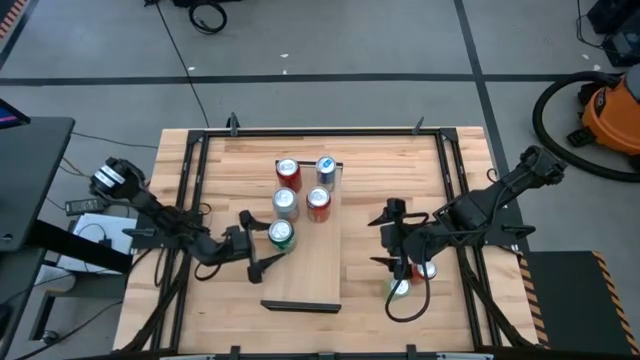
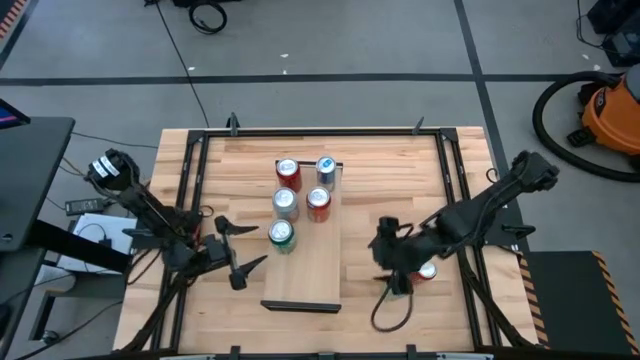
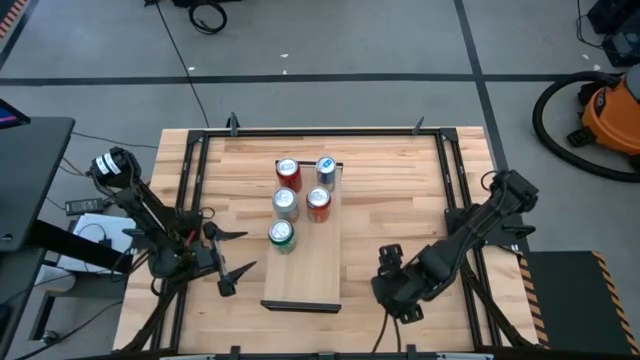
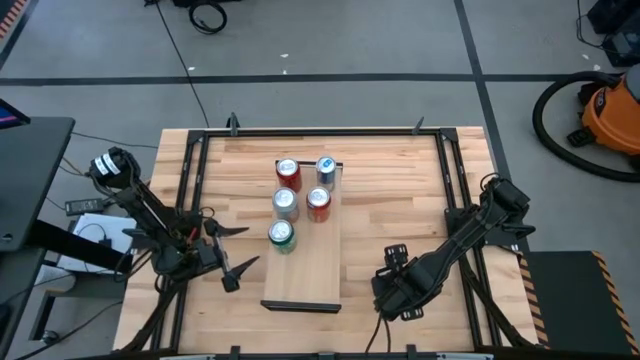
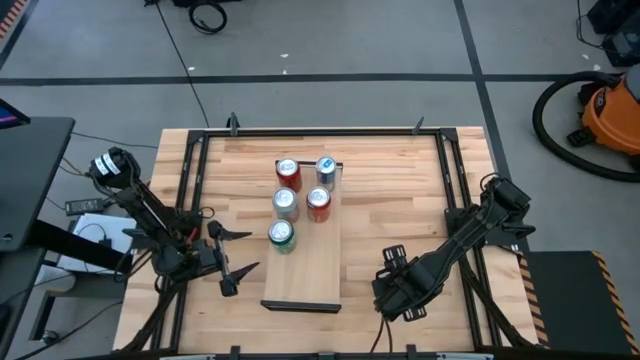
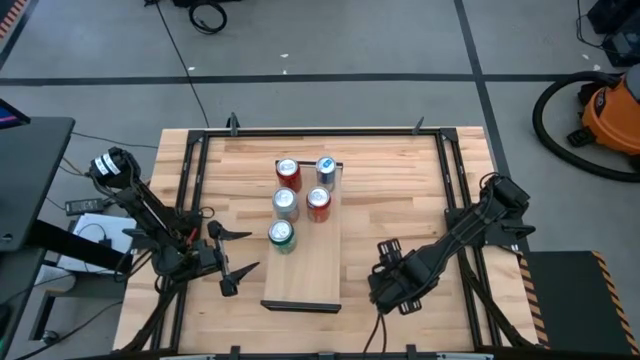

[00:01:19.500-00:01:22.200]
Task: Place canned beverage on shelf
Put the light green soda can on the shelf

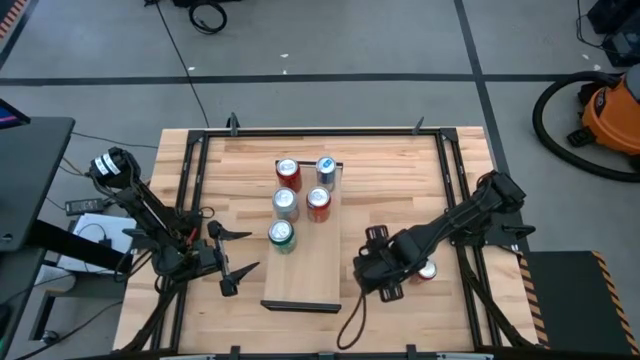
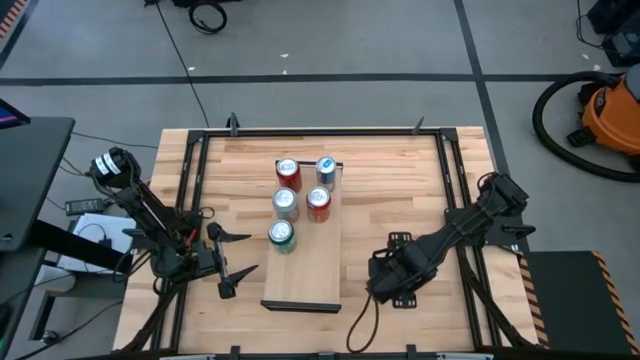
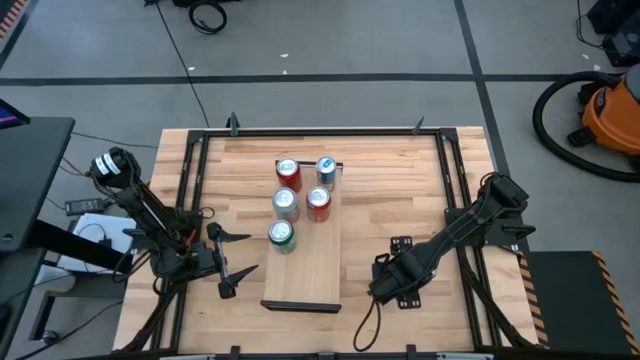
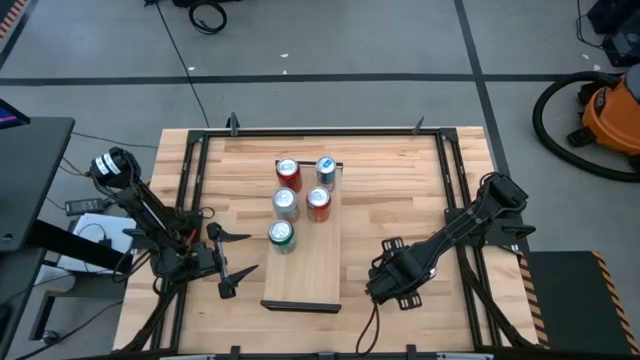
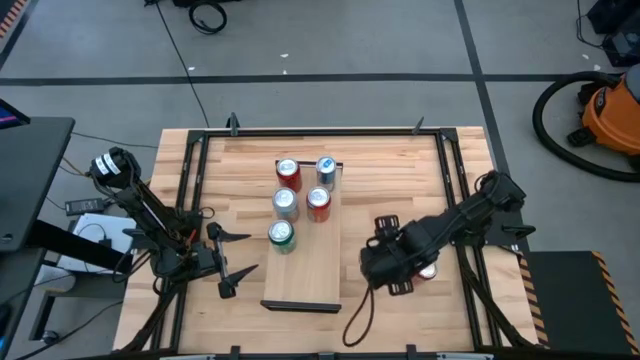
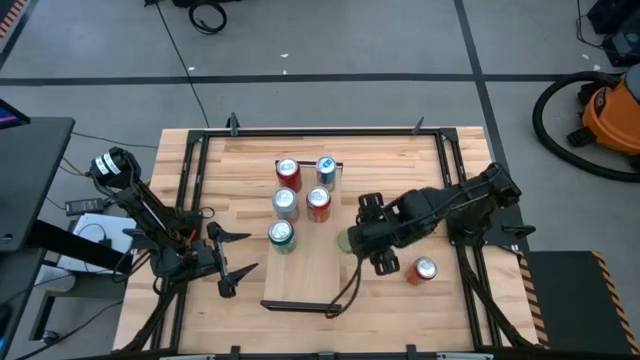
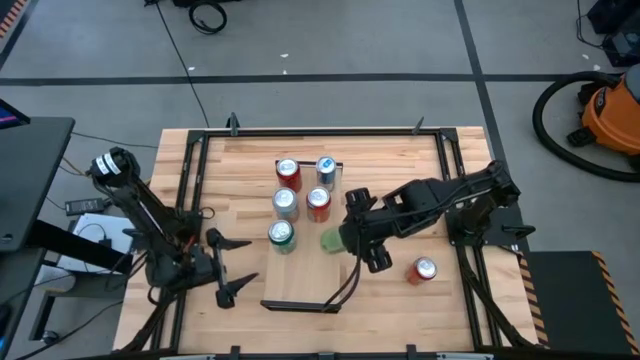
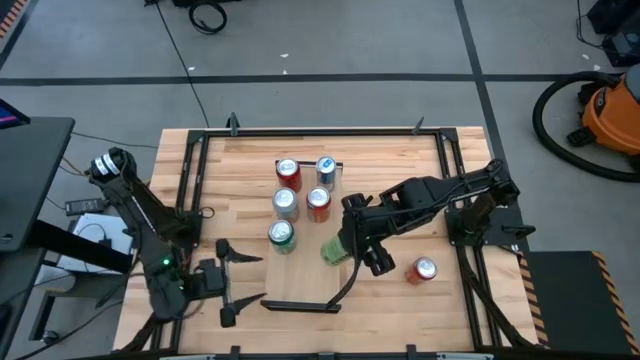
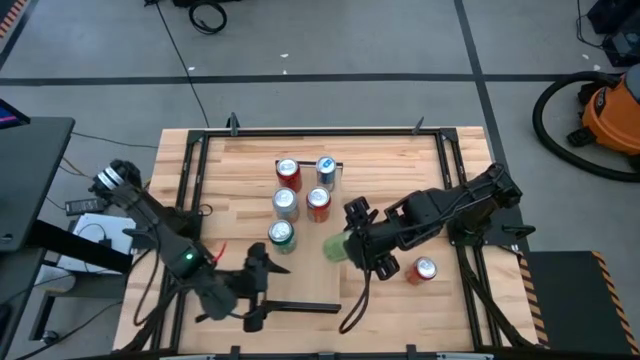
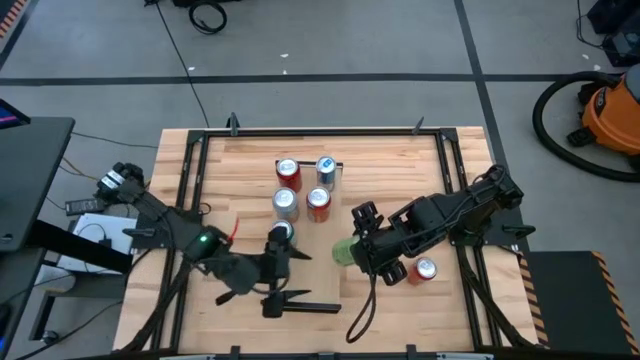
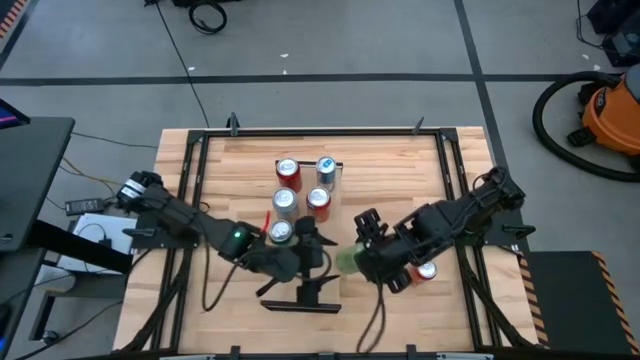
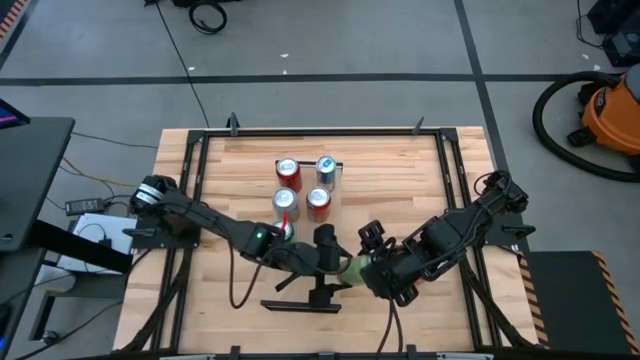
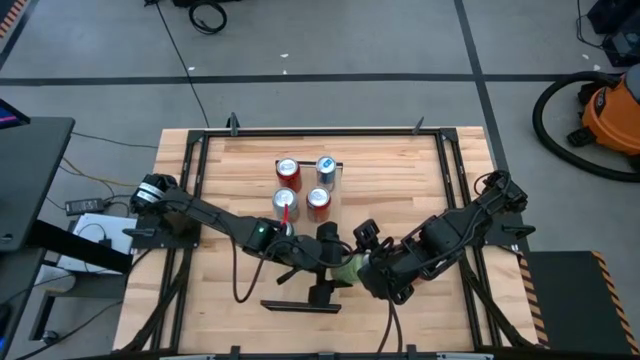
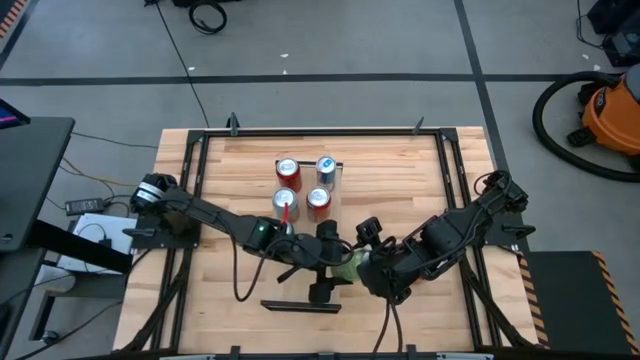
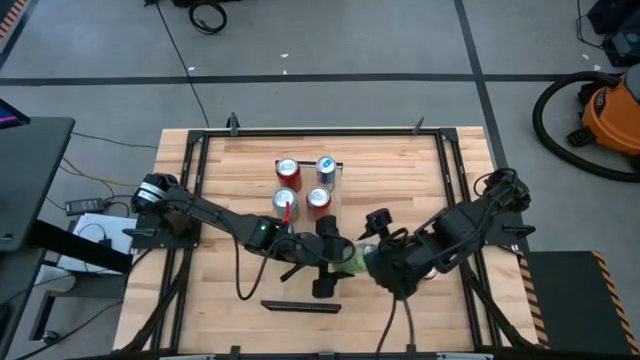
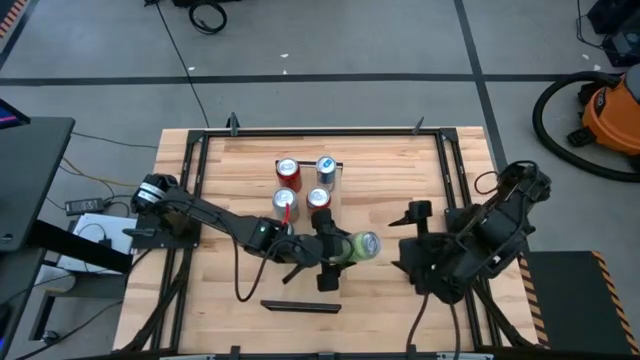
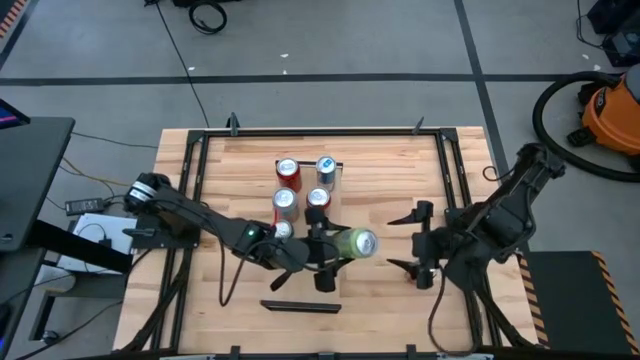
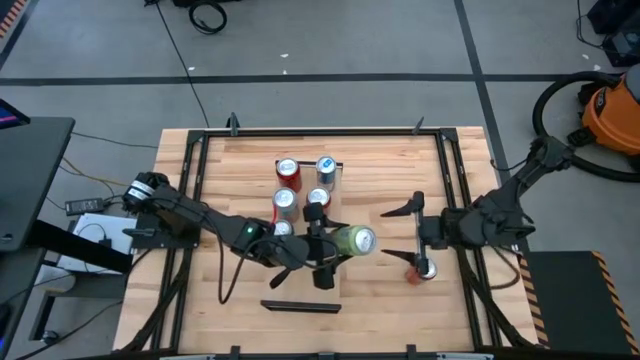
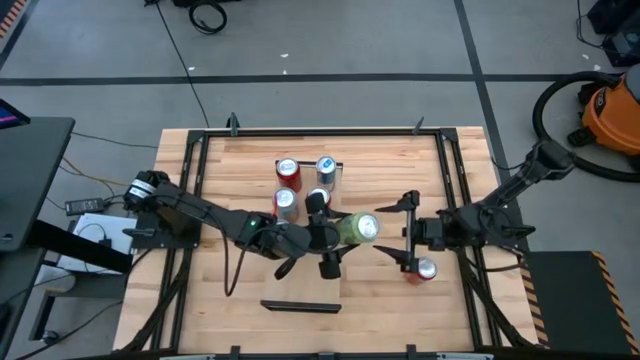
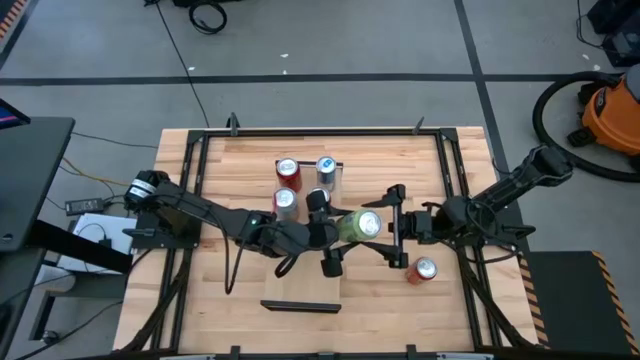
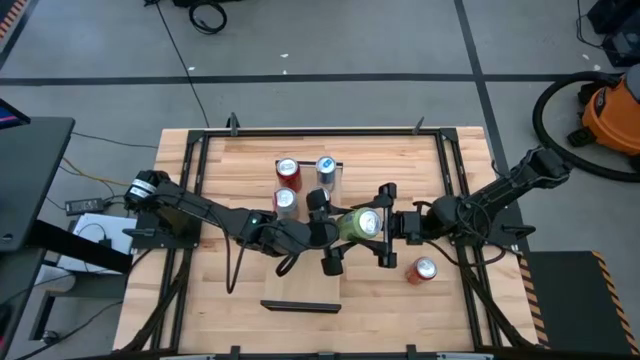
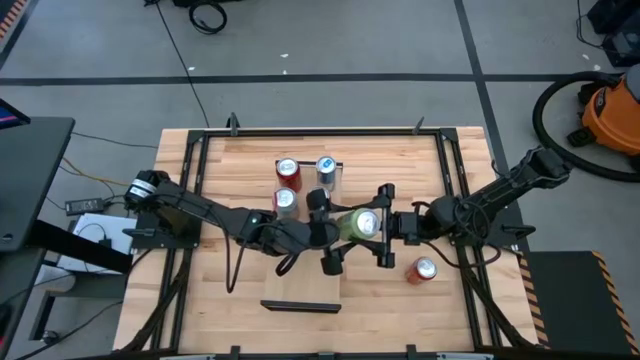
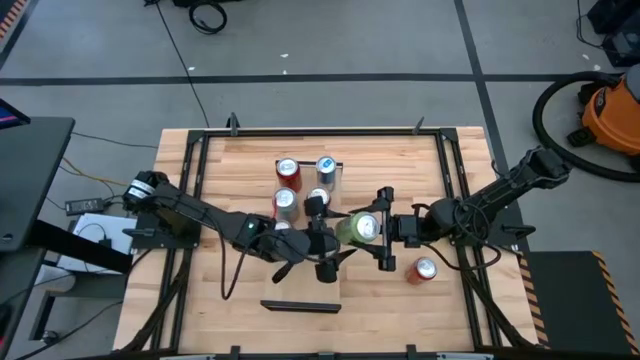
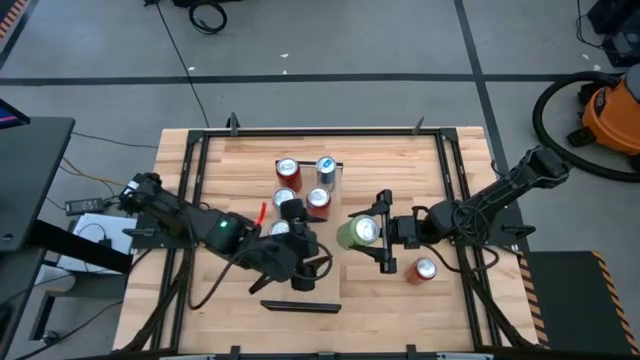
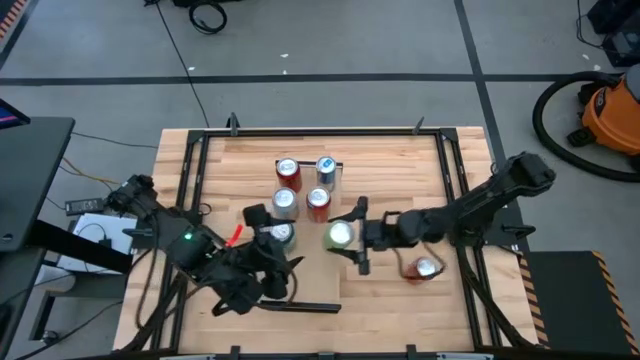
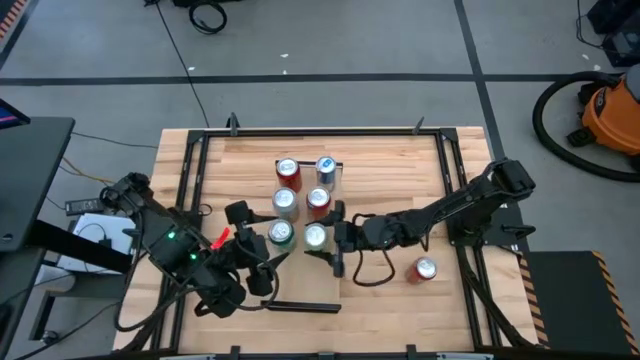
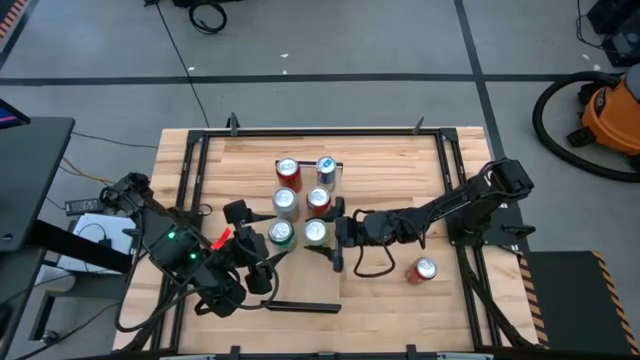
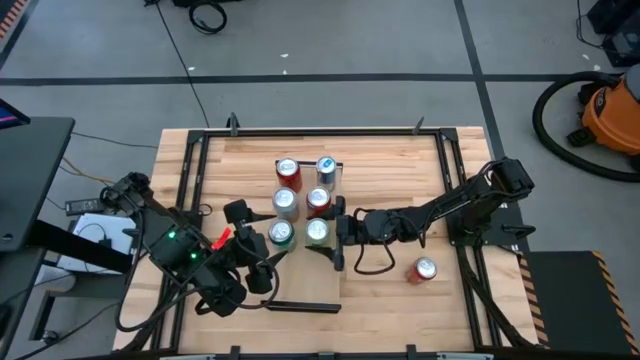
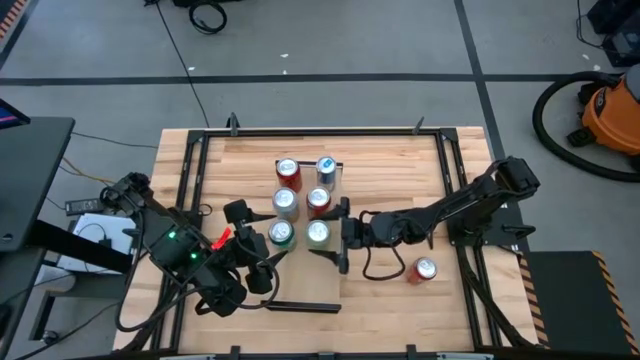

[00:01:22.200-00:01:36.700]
Put the light green soda can on the shelf

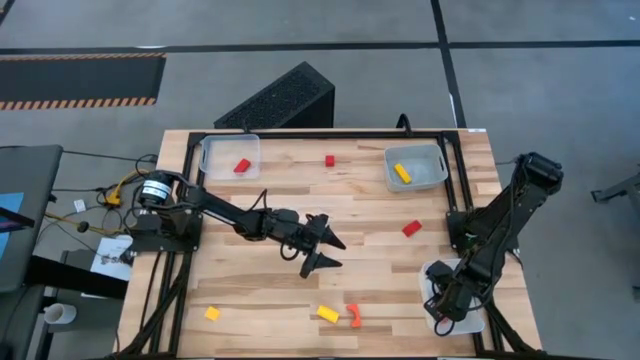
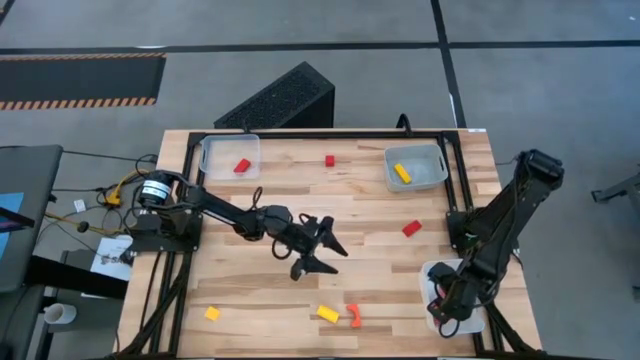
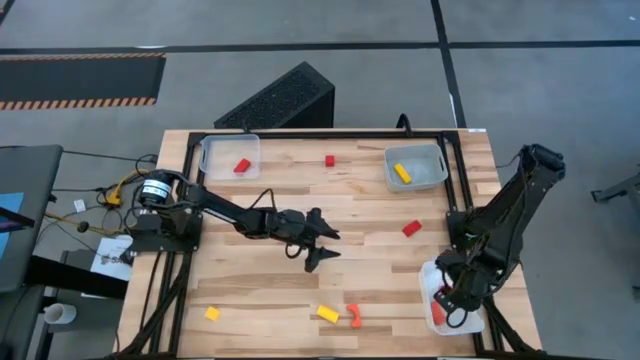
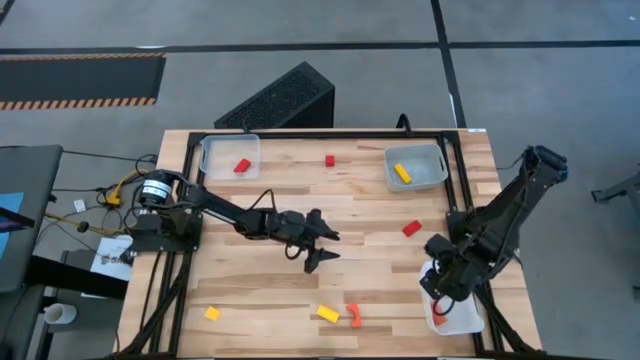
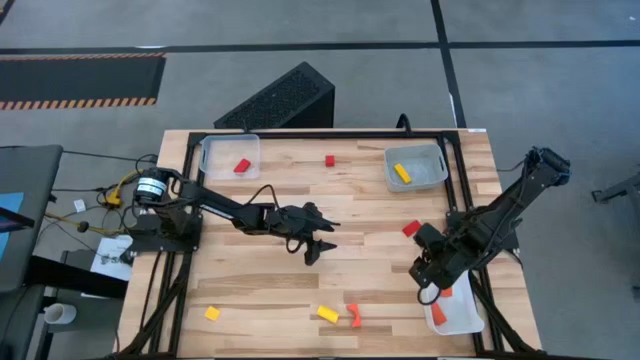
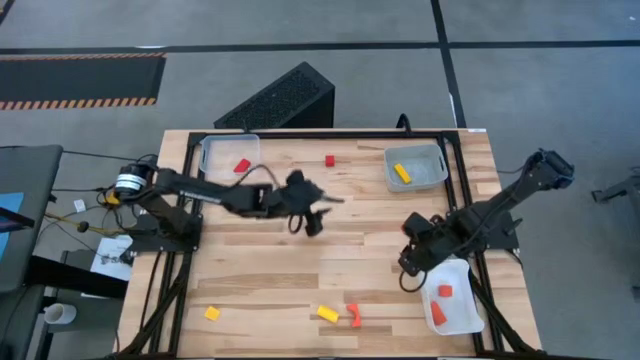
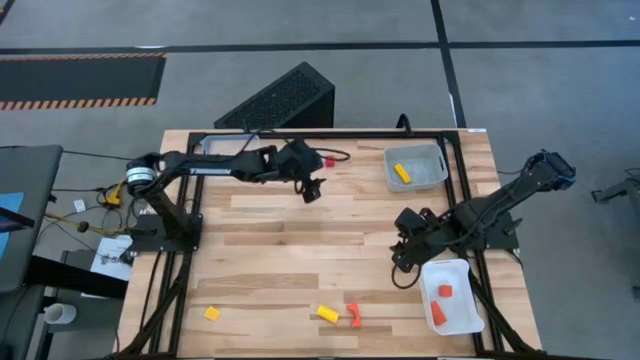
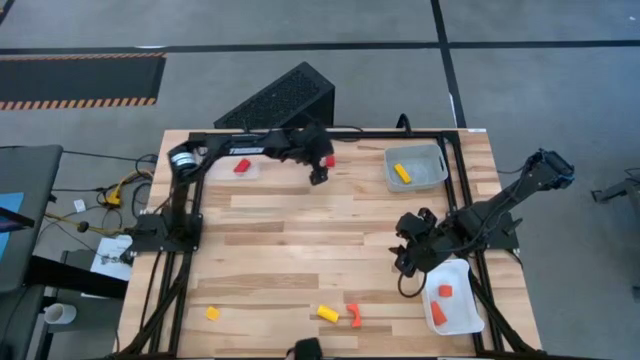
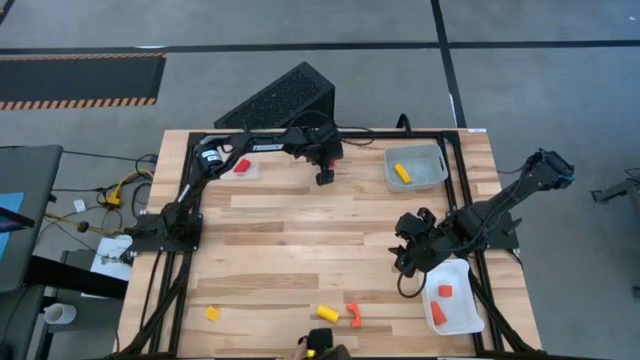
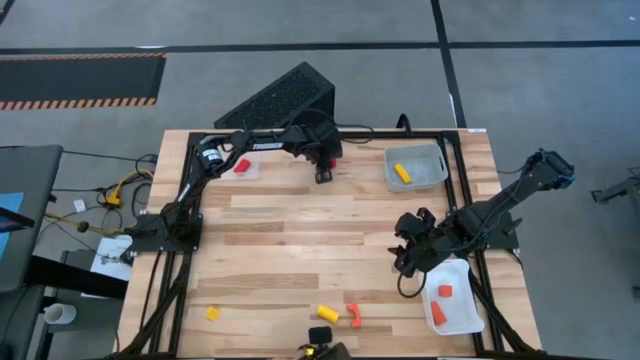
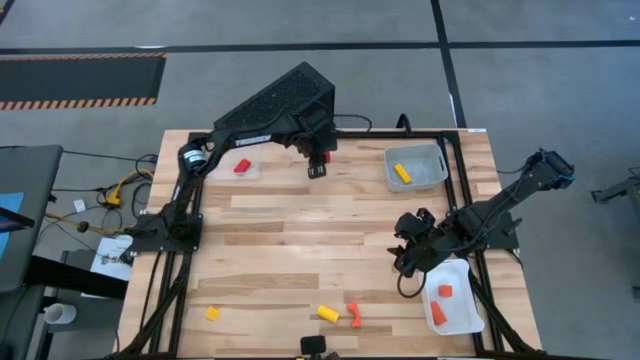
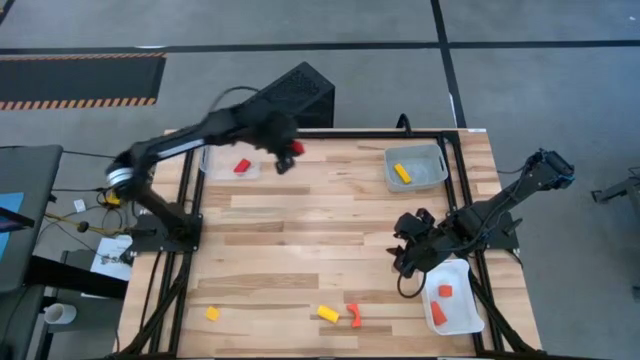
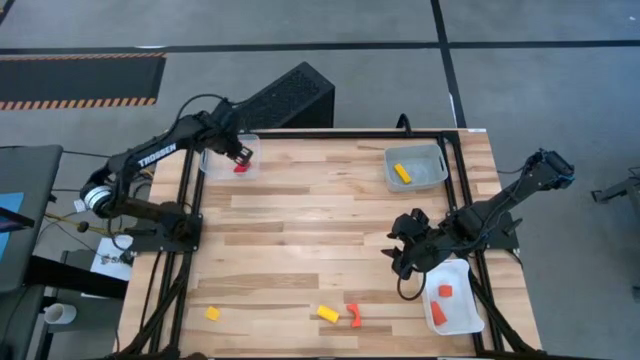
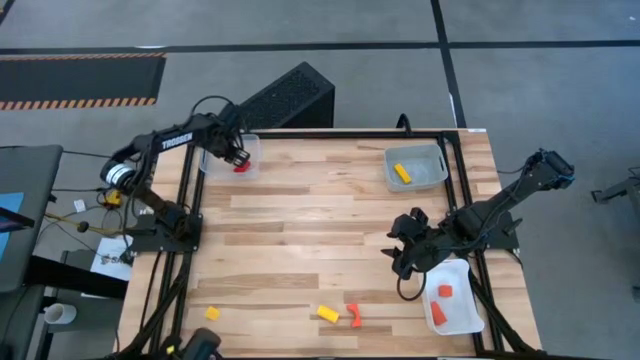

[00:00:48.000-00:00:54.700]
Task: Sort & place blocks by color
Put the top red block into the transparent bin
